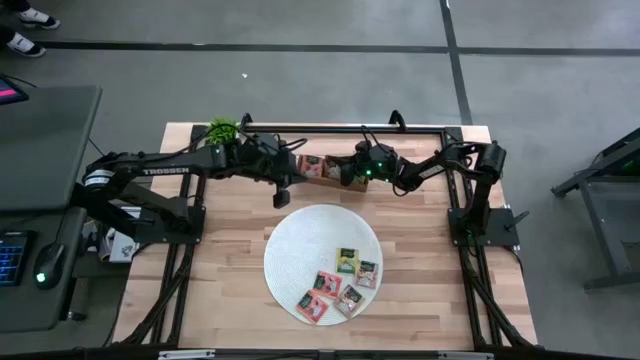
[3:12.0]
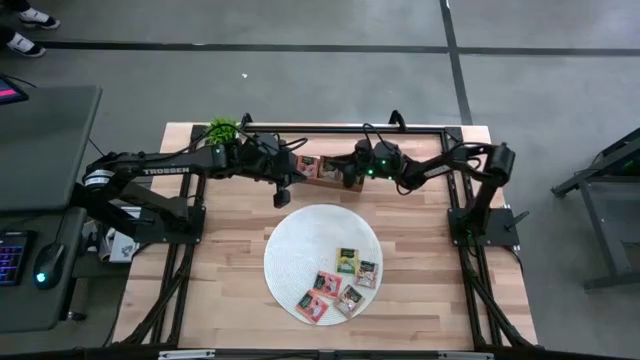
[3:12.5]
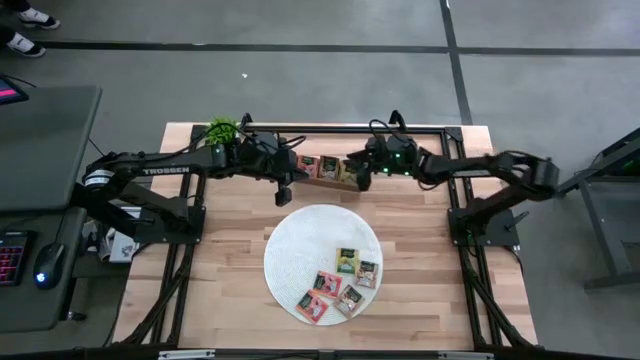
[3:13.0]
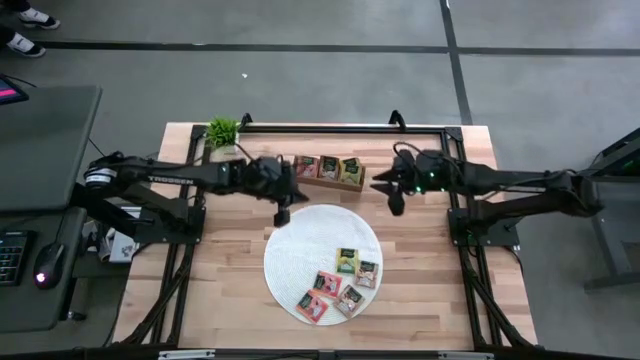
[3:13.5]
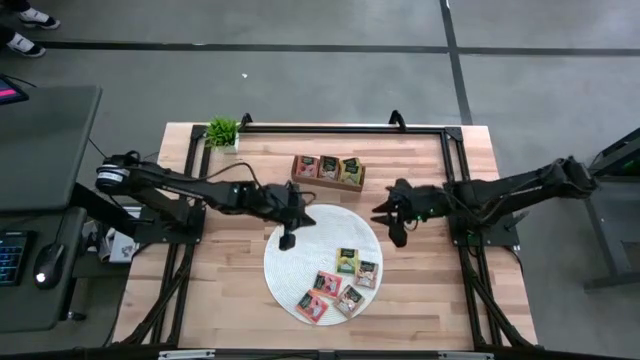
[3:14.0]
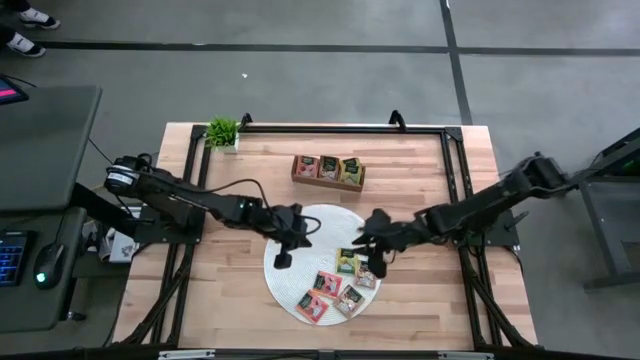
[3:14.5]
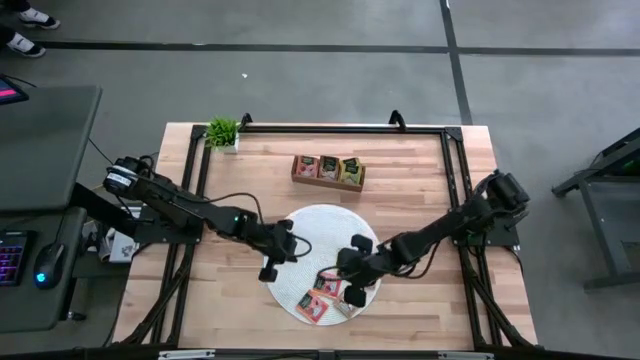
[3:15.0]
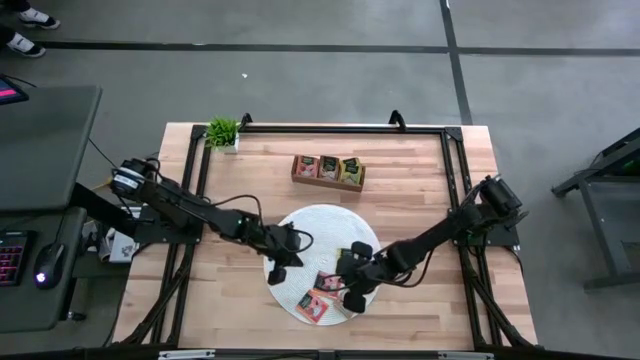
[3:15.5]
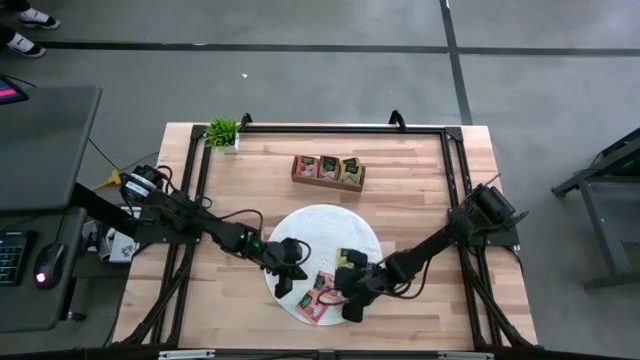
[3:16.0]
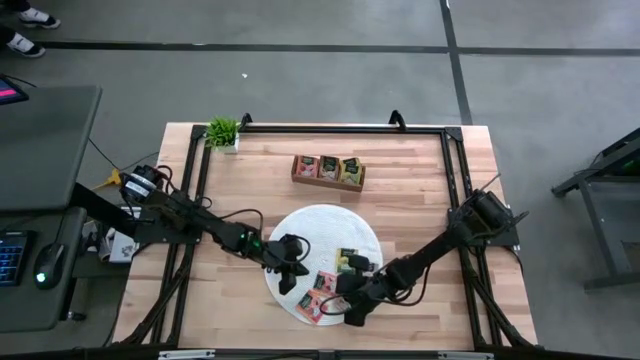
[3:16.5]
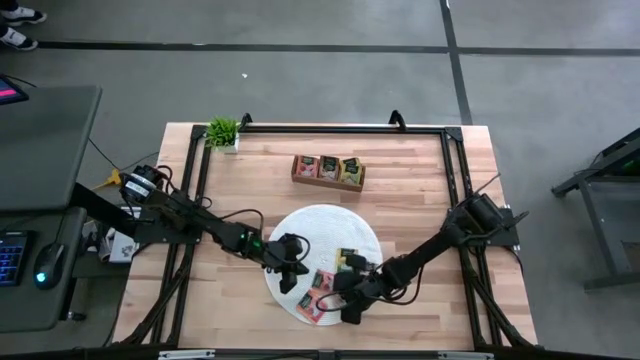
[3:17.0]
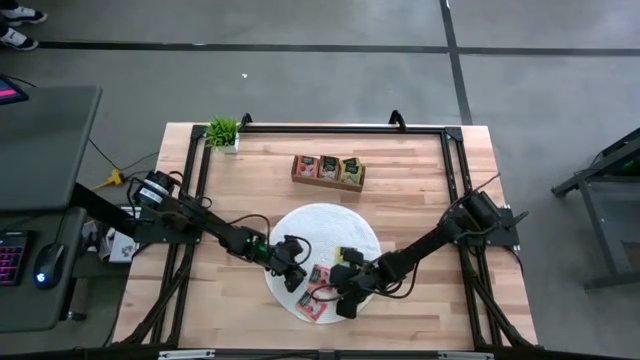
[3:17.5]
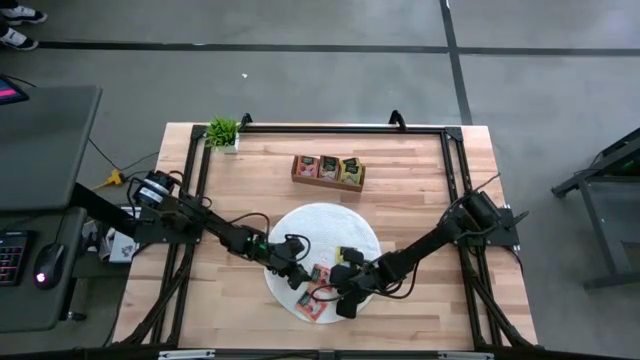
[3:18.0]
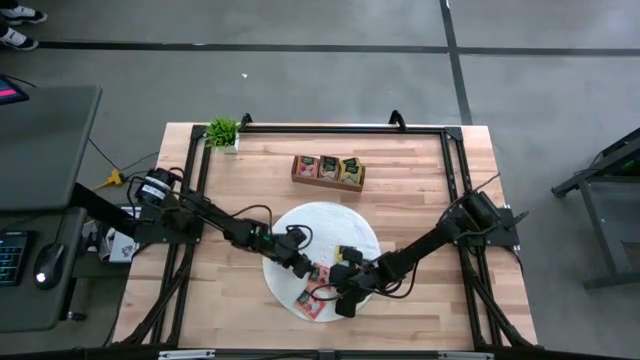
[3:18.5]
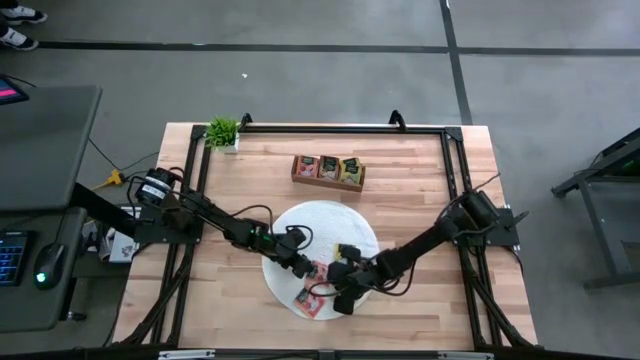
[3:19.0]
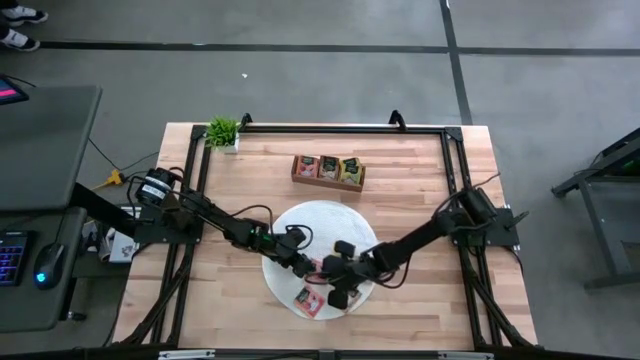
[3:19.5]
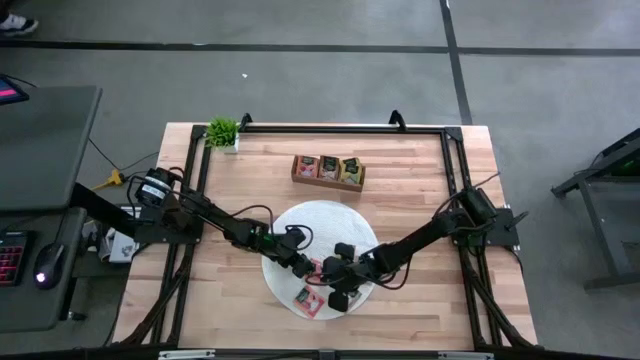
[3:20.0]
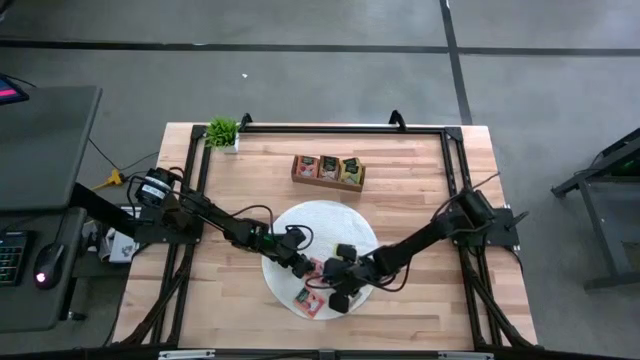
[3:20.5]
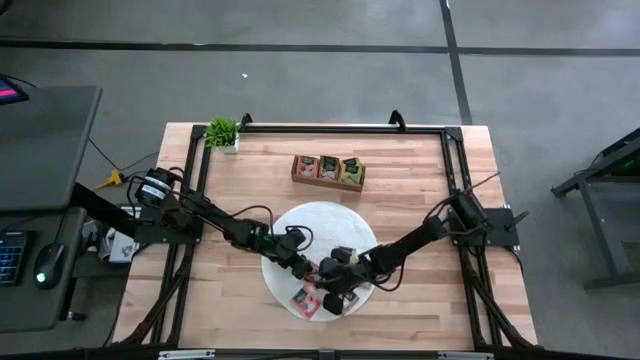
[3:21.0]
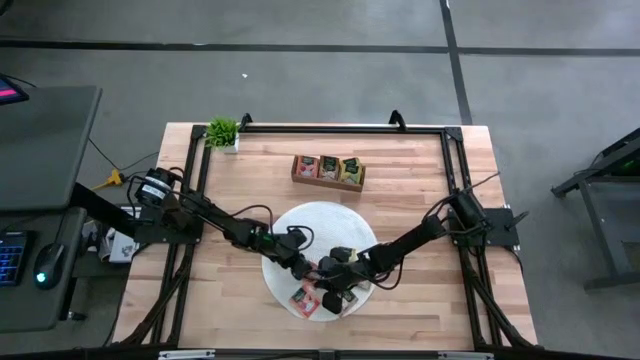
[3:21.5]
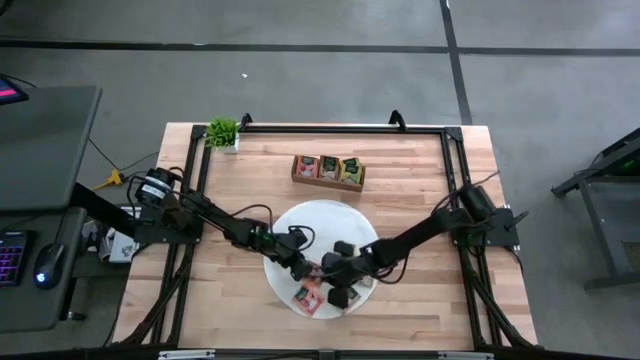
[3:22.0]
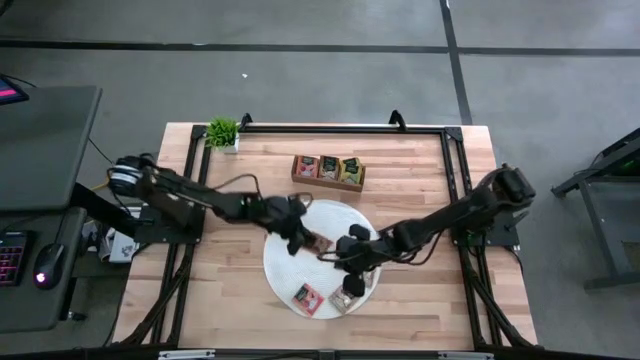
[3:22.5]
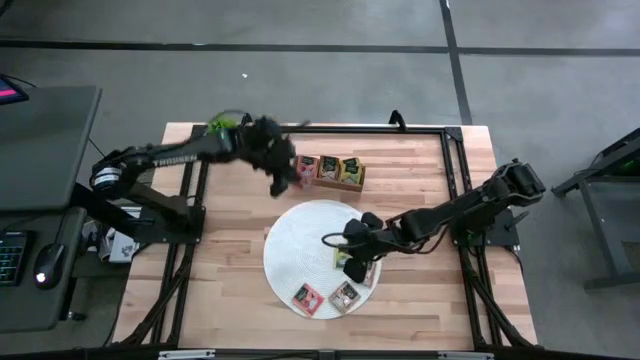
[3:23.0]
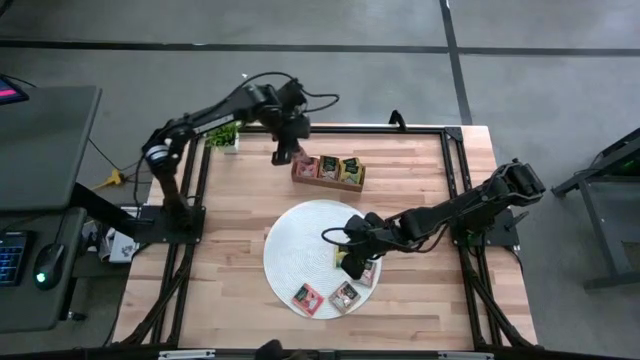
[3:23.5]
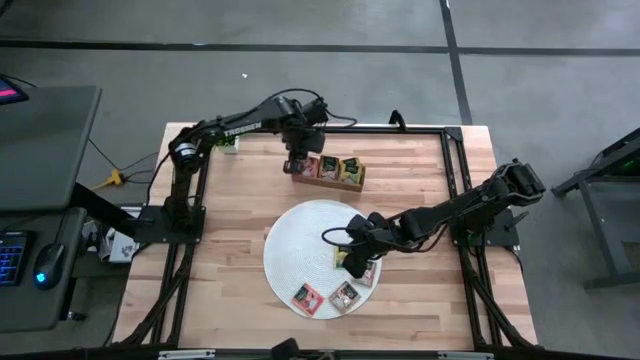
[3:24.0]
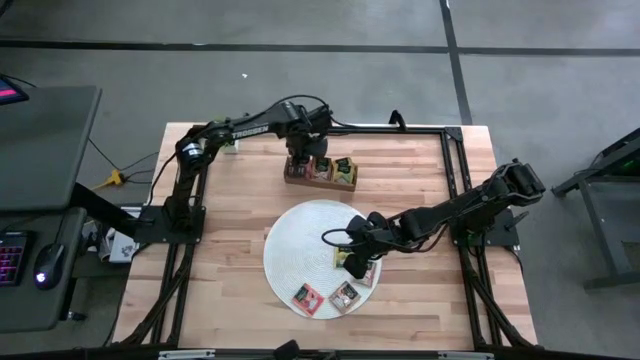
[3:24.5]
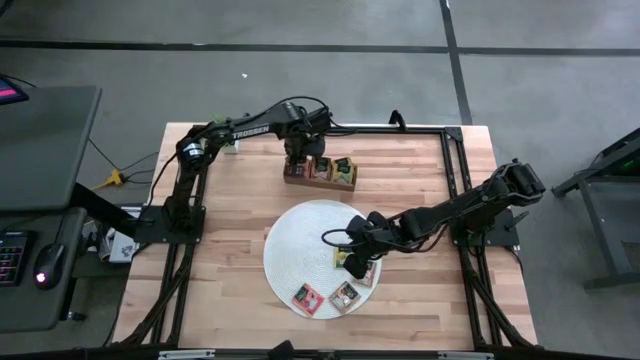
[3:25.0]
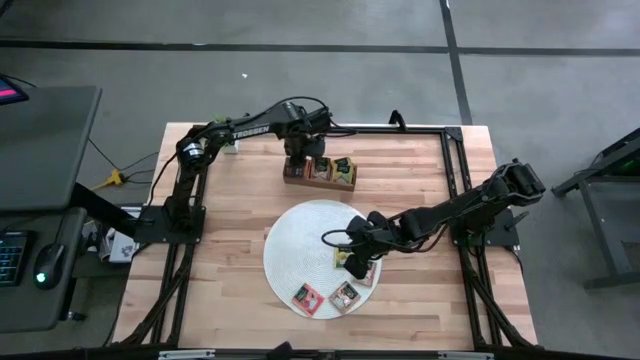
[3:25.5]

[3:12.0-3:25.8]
Task: Pick & Place Tea
Put the orange tea bag into the left section of the wooden organizer

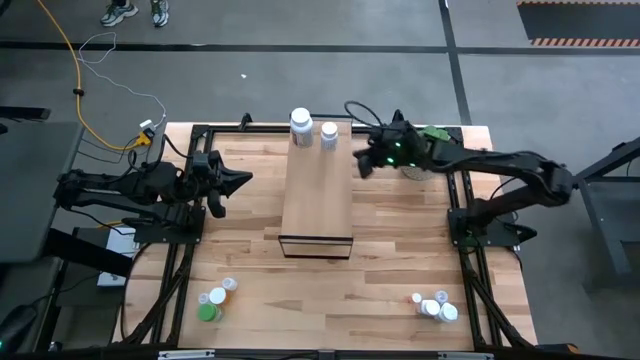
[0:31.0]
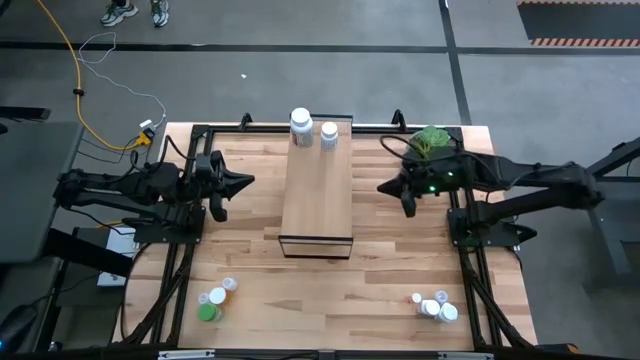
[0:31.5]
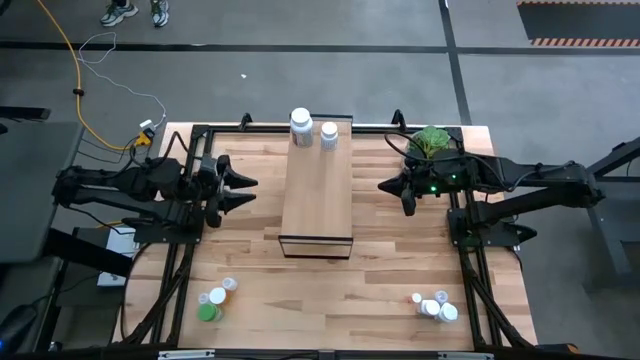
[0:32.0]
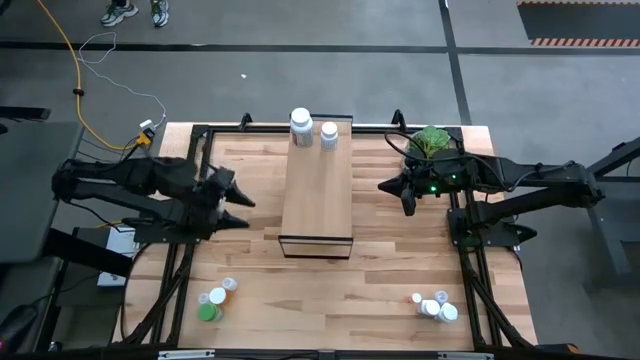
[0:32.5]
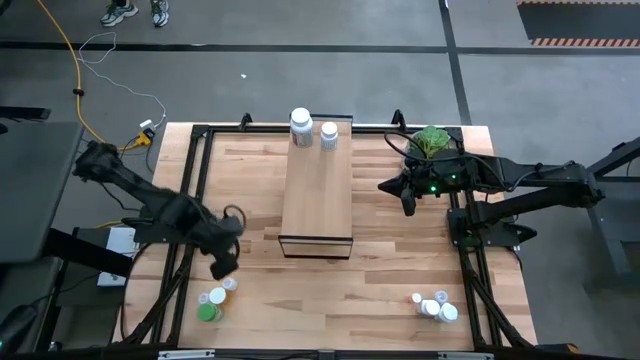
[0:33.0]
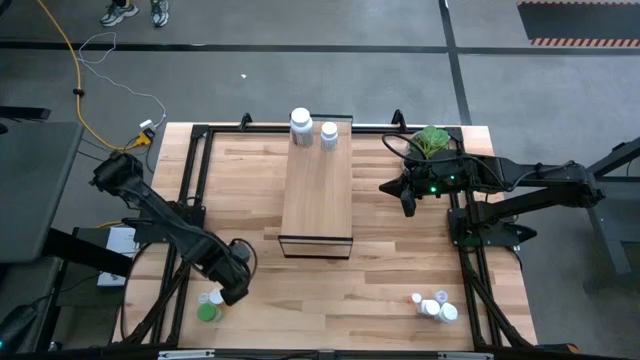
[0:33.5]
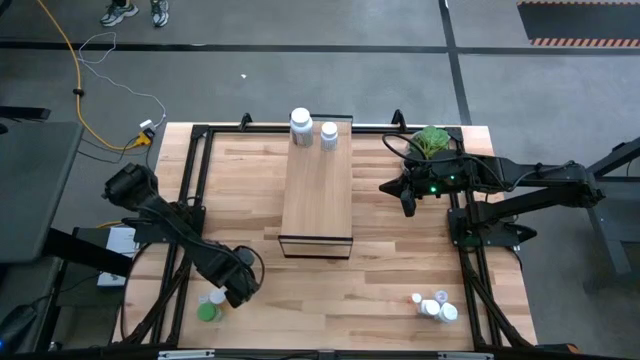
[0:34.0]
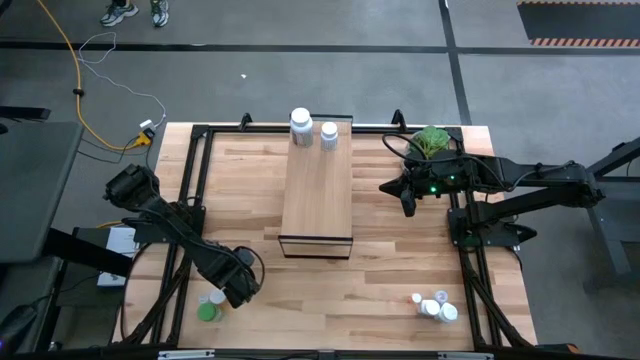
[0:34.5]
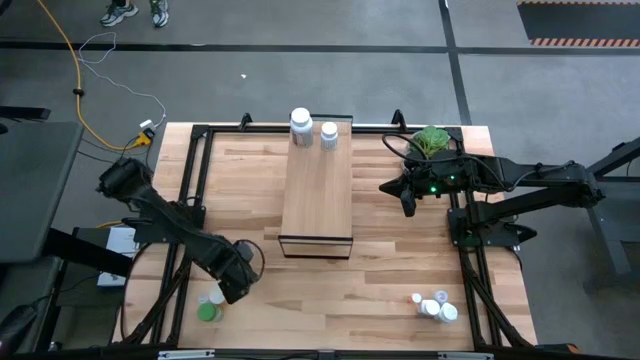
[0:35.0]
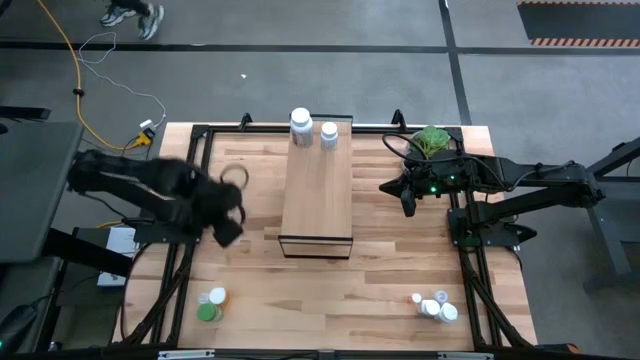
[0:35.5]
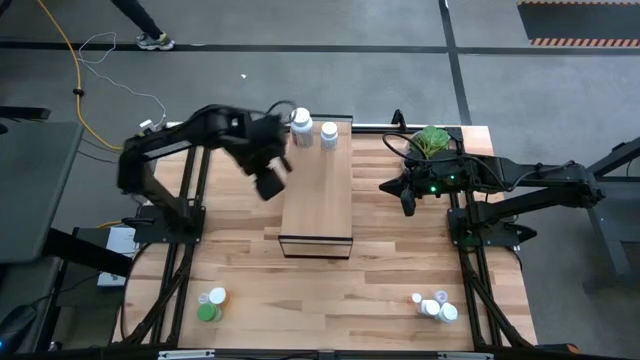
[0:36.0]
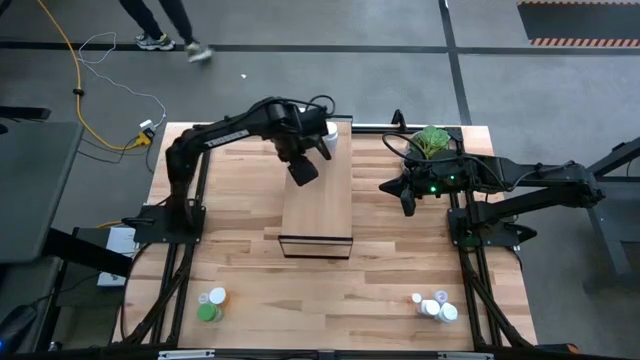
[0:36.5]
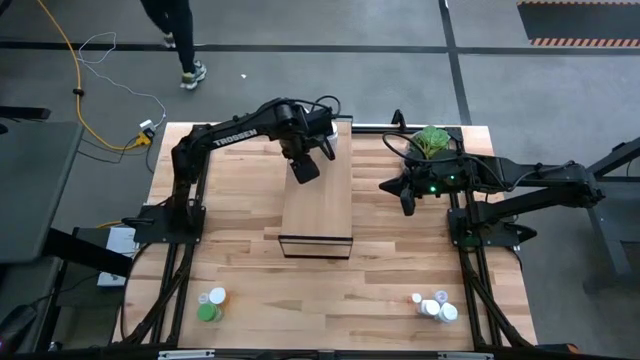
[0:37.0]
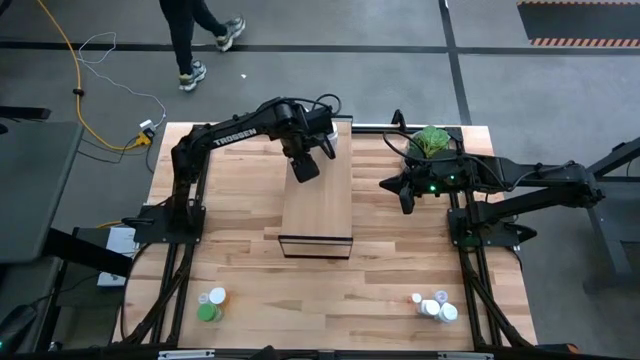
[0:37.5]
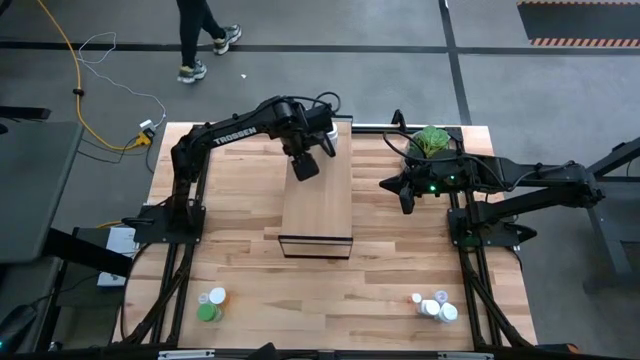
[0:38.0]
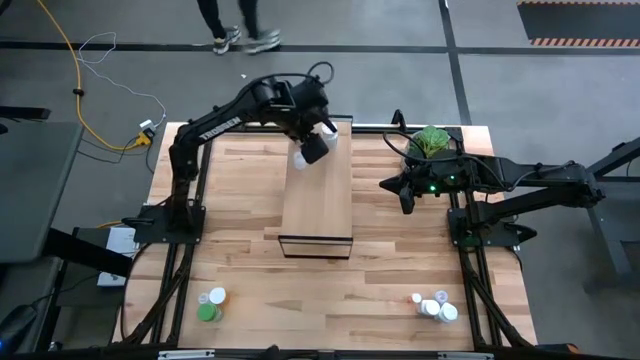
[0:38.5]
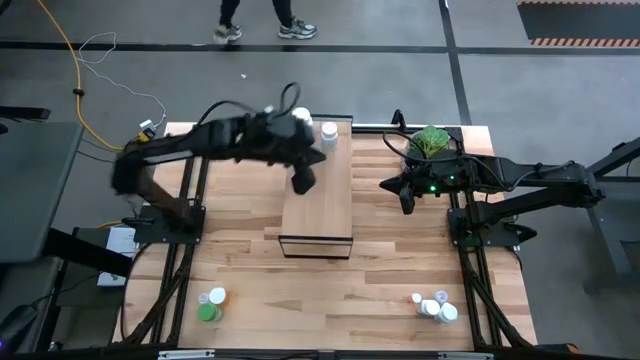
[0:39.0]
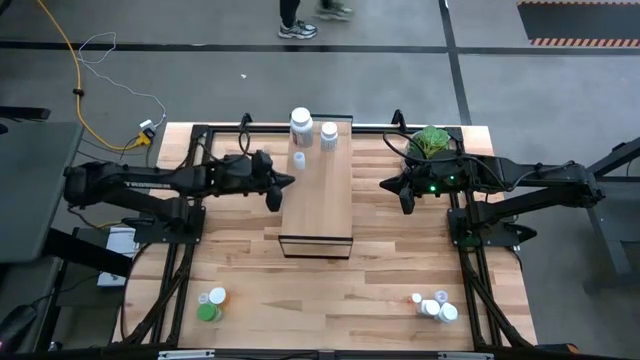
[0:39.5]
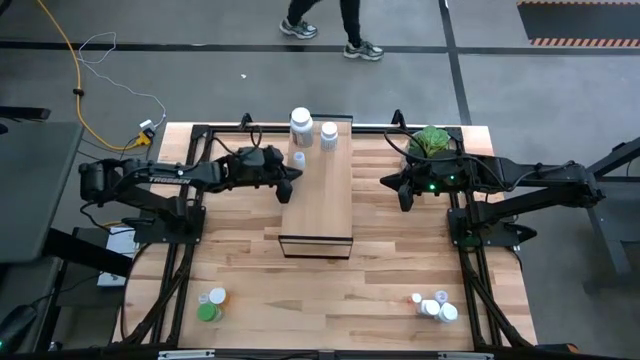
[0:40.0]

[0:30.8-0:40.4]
Task: Pick and place medicine bottles onto shelf by color
Put the transparent medicine bottle on the shelf
